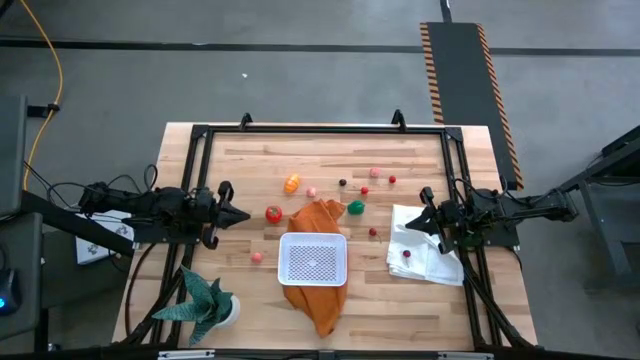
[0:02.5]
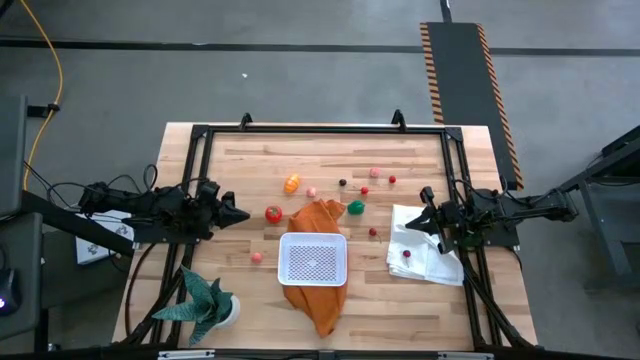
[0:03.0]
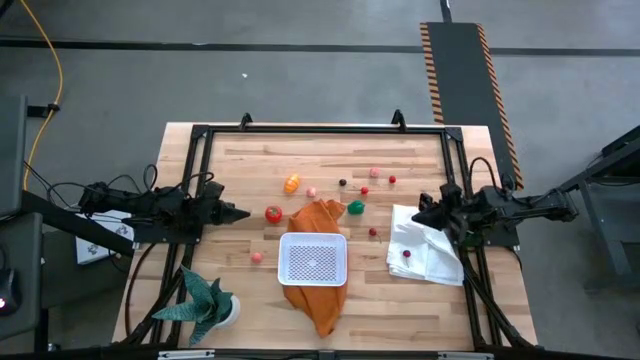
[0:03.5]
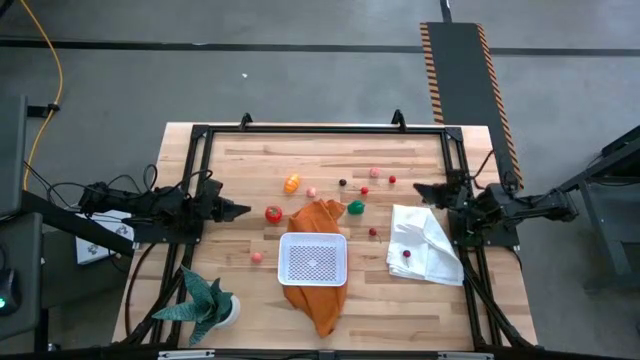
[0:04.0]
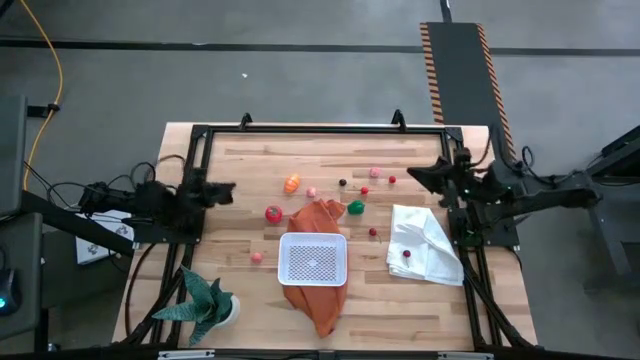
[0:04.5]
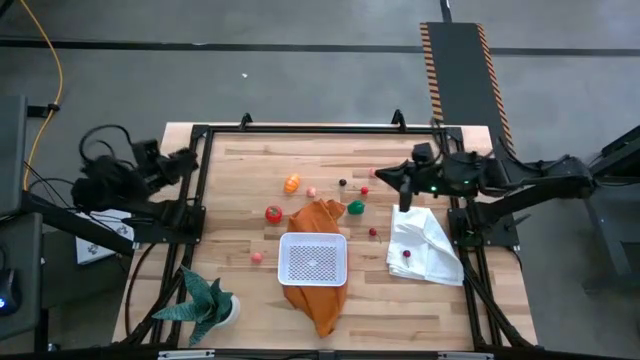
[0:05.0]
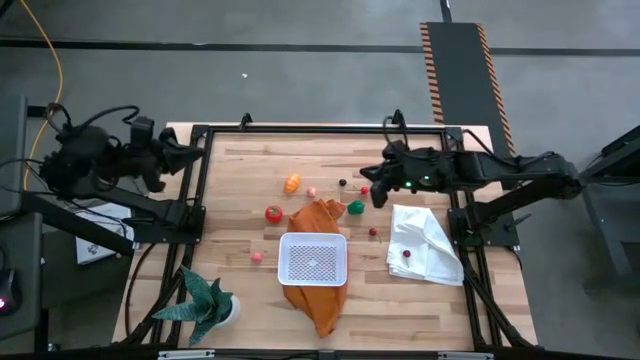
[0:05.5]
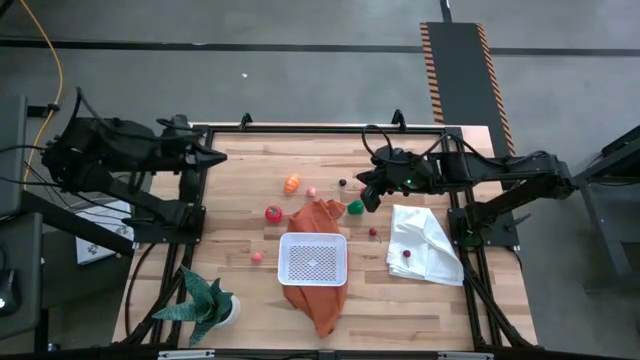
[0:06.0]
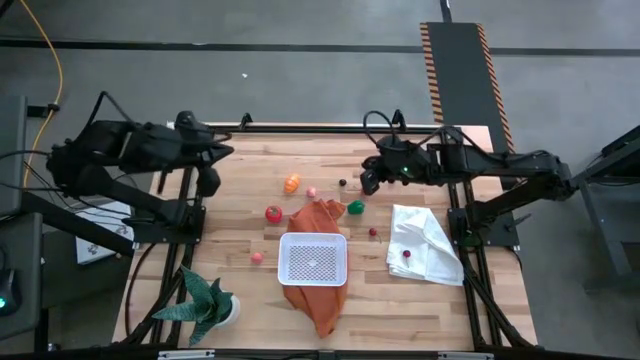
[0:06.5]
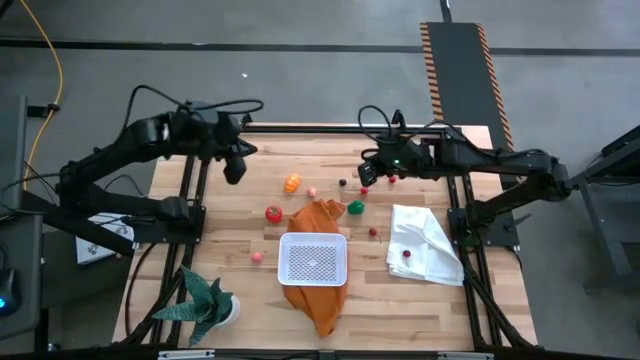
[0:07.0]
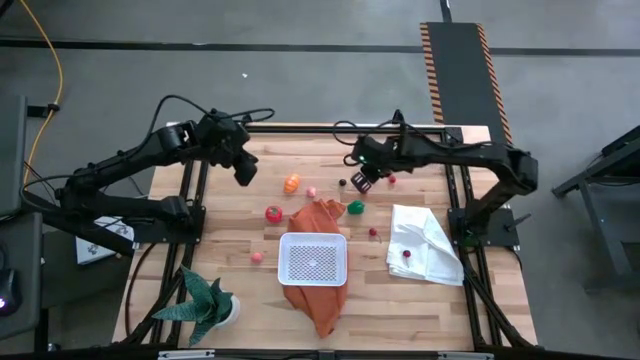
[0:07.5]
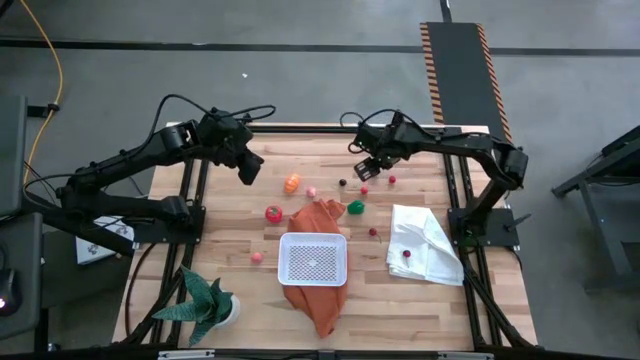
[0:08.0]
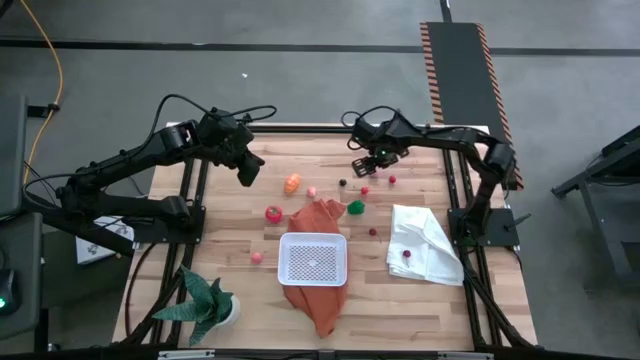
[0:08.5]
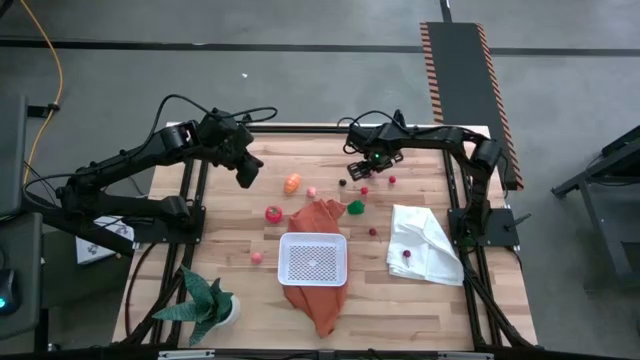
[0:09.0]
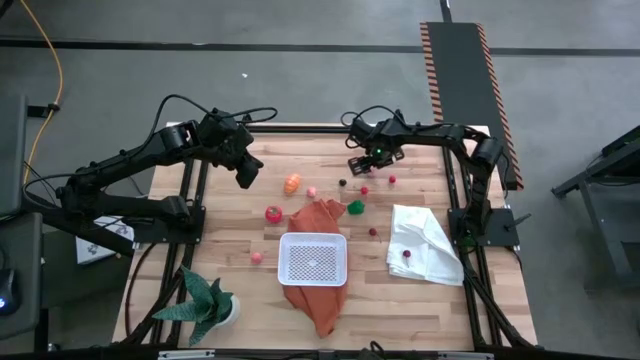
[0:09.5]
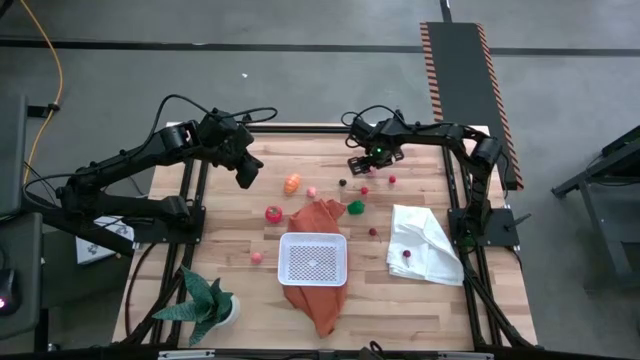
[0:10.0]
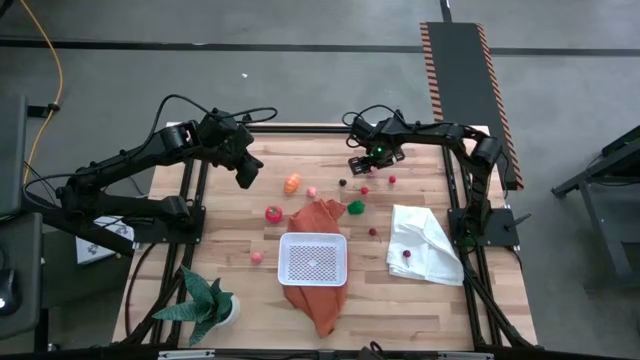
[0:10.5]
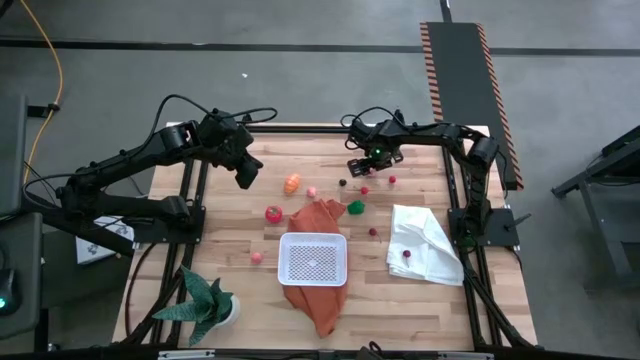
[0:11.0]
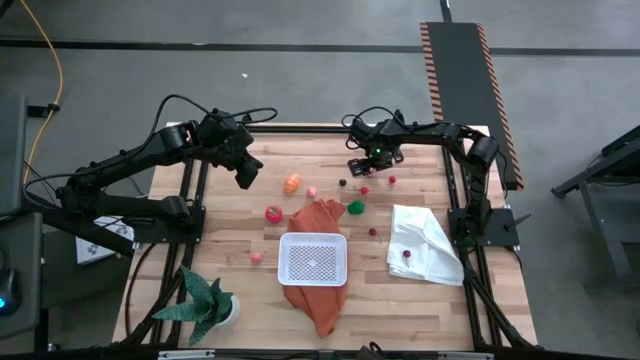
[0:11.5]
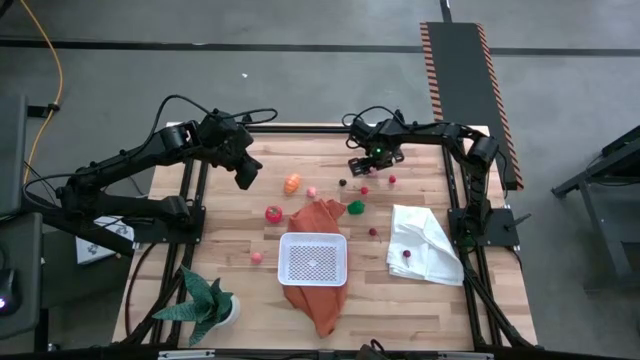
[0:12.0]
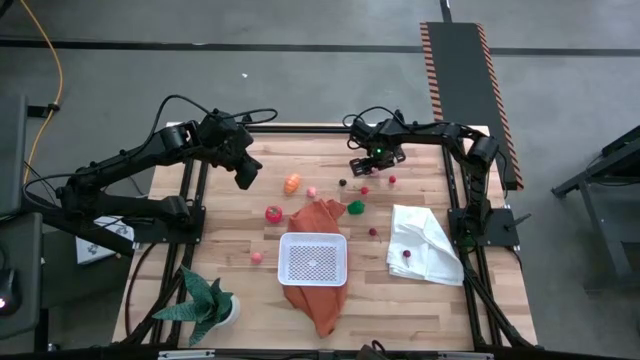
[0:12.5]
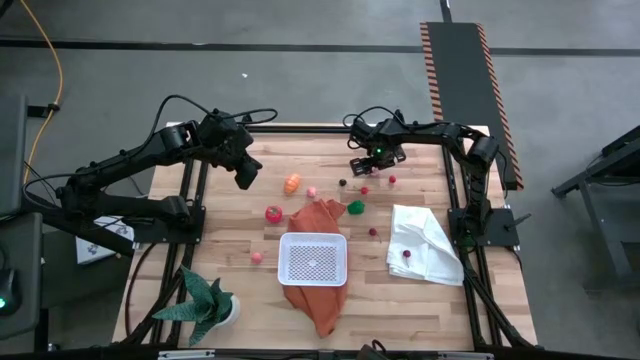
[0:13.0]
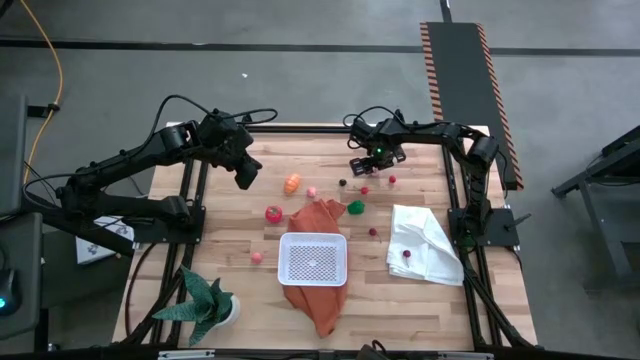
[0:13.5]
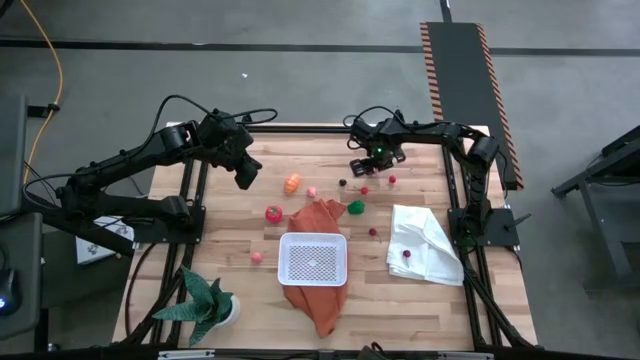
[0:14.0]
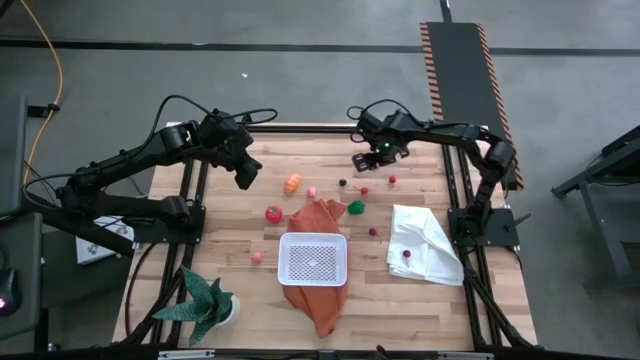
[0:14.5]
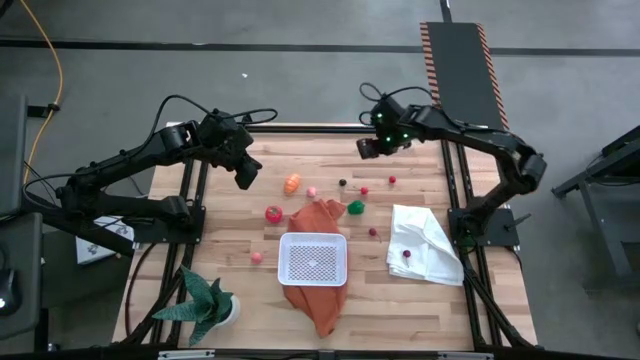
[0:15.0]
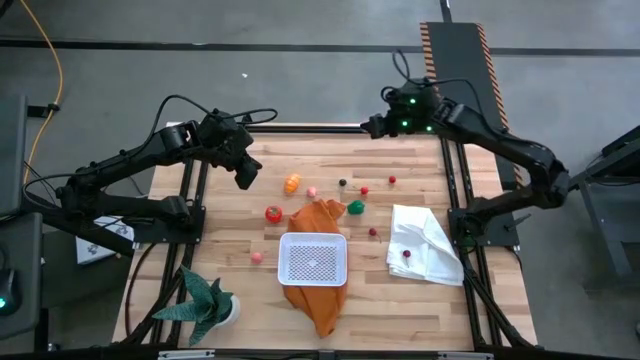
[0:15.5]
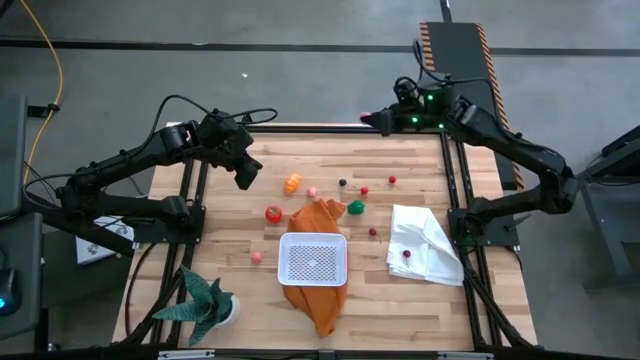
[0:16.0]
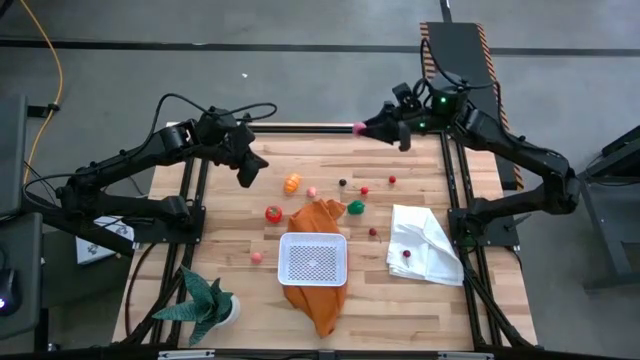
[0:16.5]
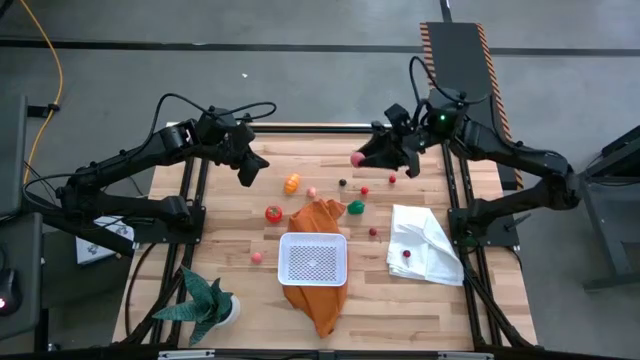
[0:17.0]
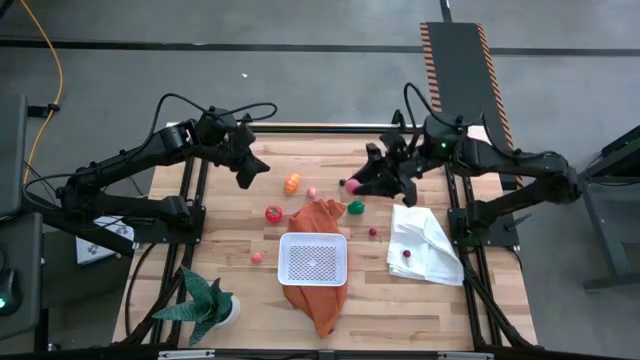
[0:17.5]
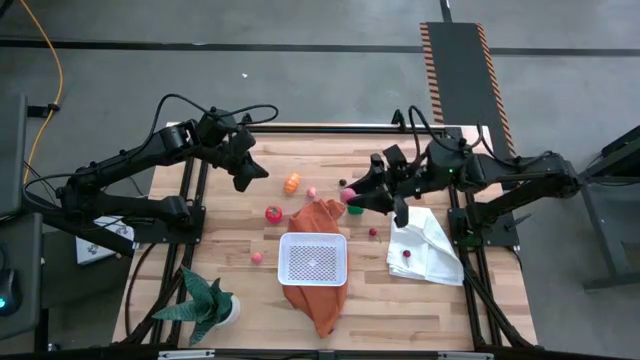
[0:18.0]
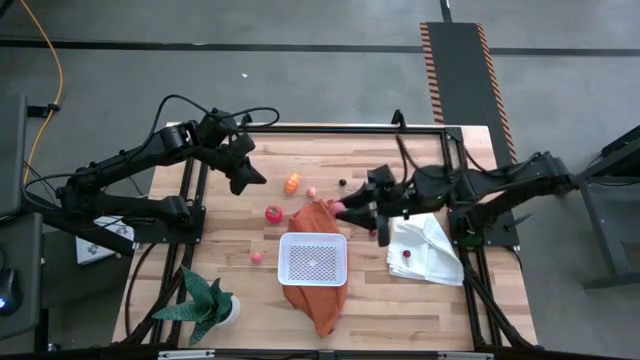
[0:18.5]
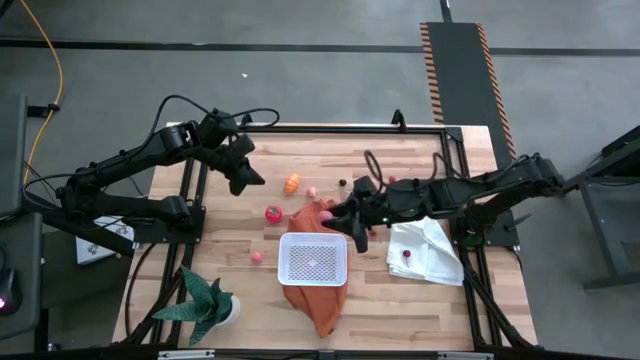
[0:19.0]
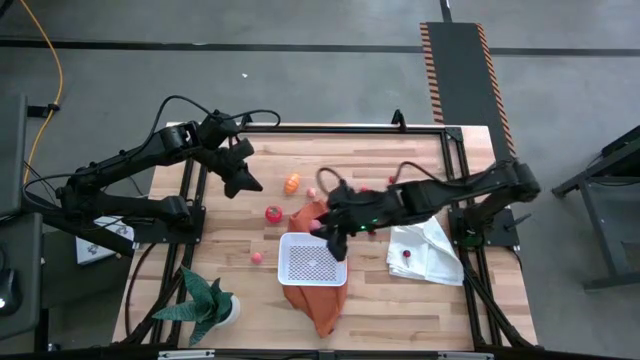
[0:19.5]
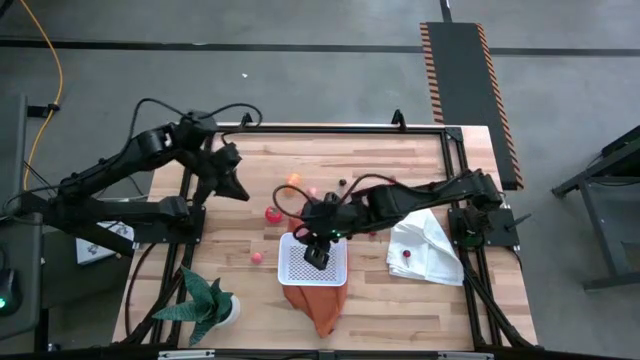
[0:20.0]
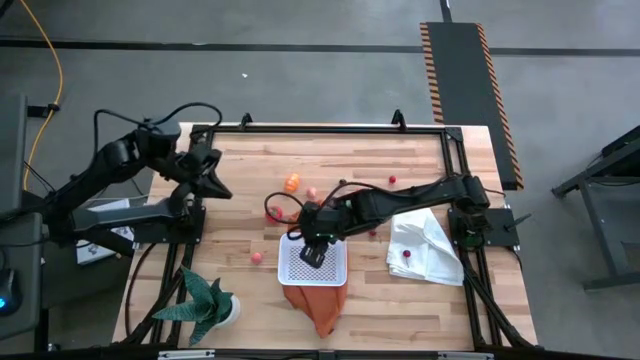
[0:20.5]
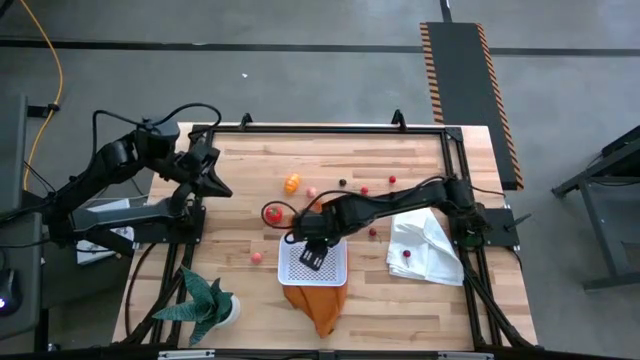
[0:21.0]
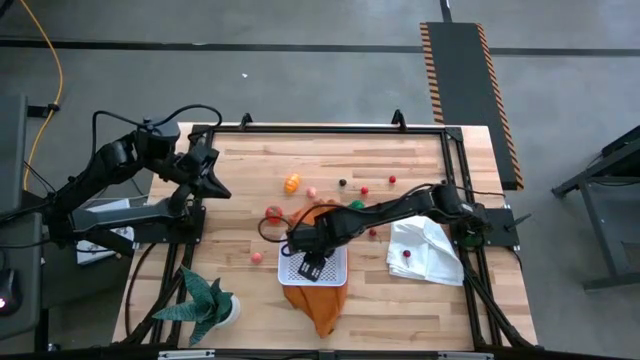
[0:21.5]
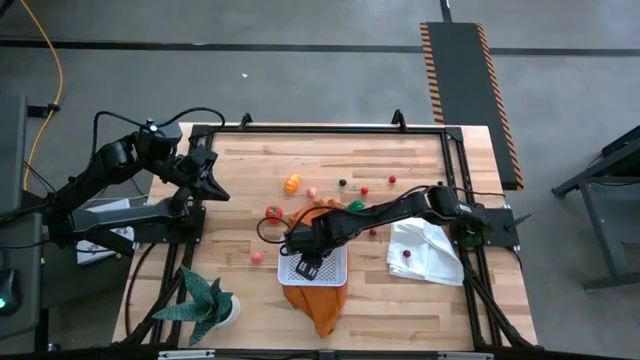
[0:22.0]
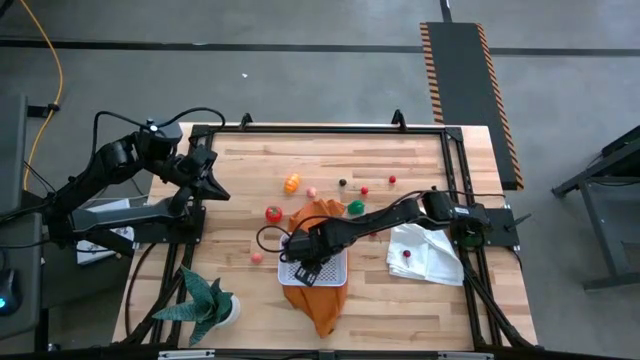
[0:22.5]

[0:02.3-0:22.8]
Task: Pick and placing Produce into tupperware
Put the top pink peach into the white basket
